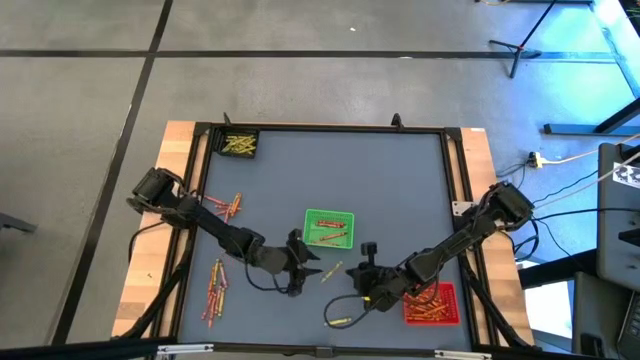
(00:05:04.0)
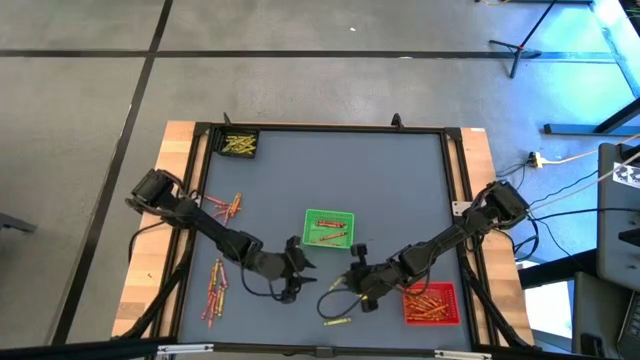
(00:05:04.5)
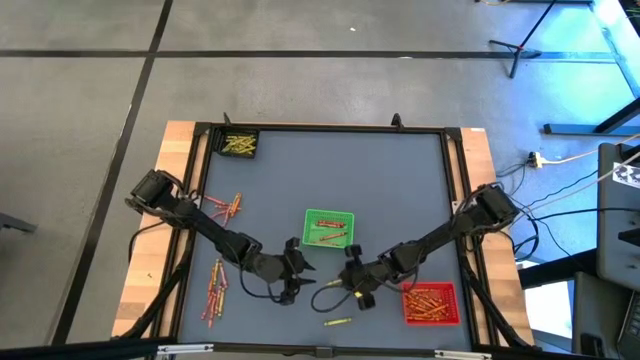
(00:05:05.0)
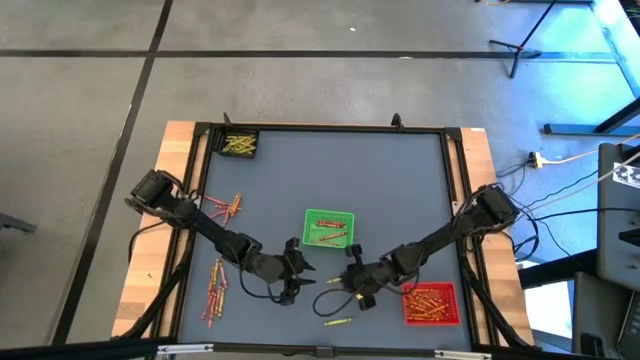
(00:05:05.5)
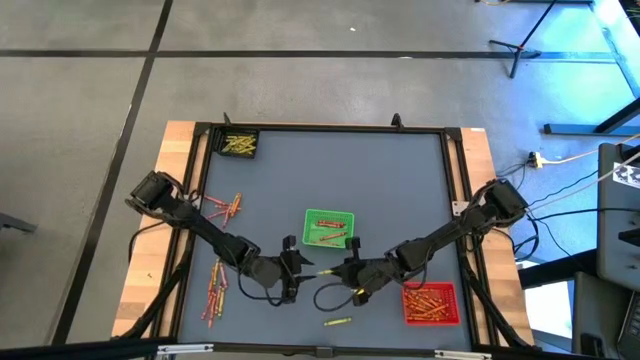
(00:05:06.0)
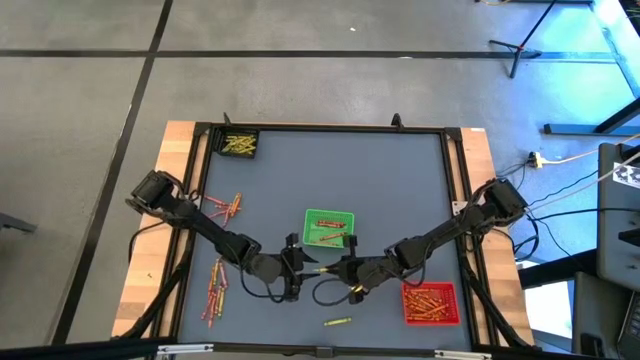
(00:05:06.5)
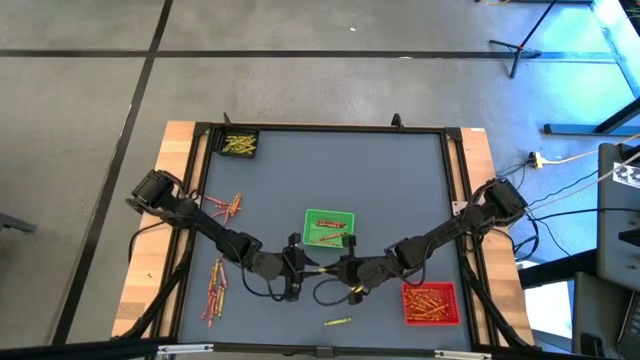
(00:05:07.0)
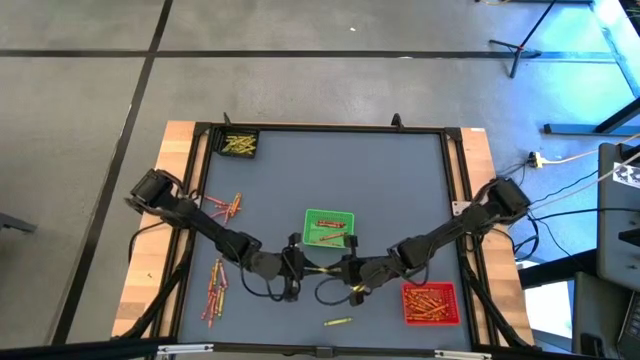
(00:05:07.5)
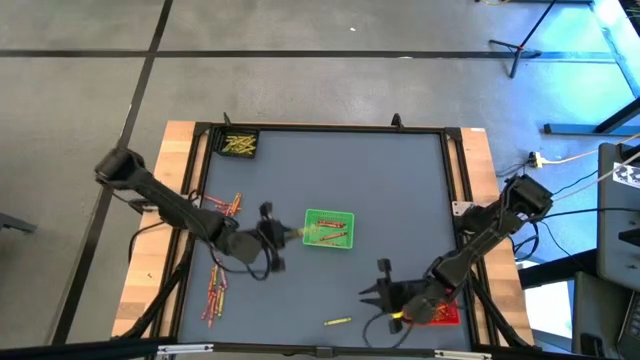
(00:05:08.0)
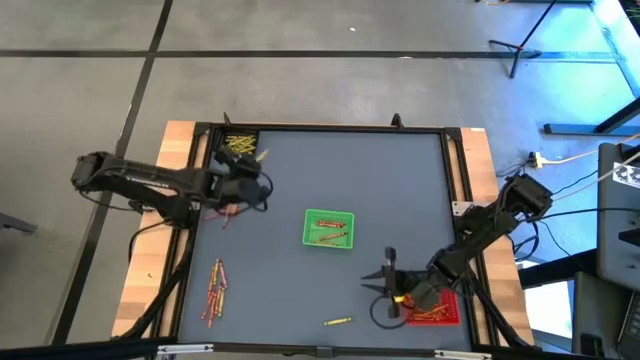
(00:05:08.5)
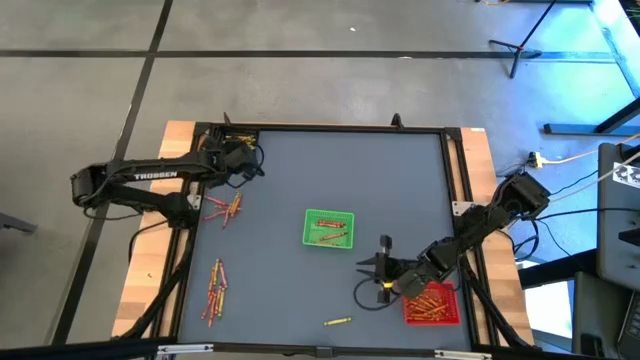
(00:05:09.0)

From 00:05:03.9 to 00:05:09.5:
Task: Sort crayons
Put the light green crayon into the black bin

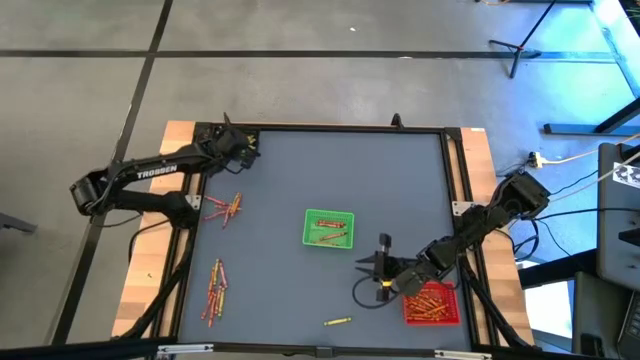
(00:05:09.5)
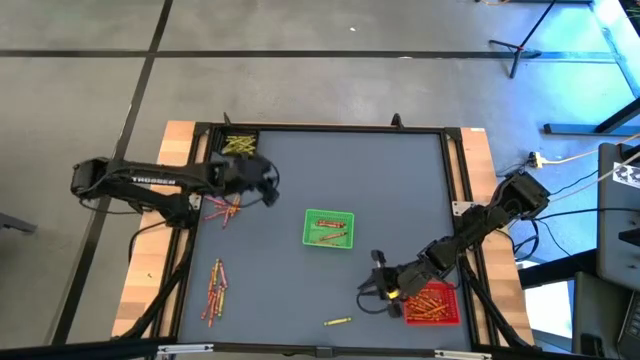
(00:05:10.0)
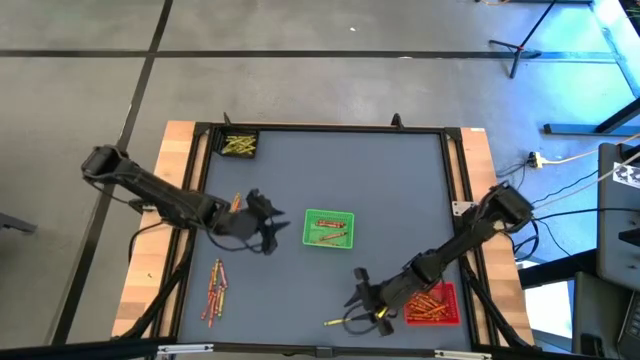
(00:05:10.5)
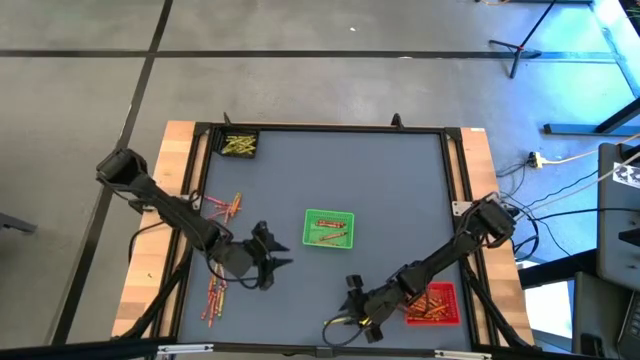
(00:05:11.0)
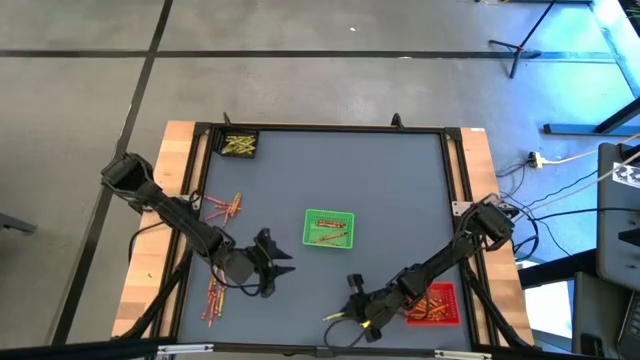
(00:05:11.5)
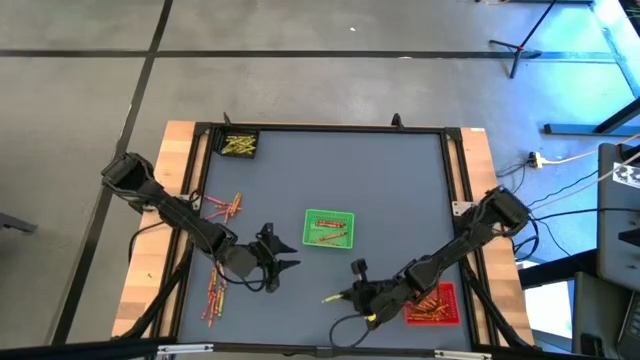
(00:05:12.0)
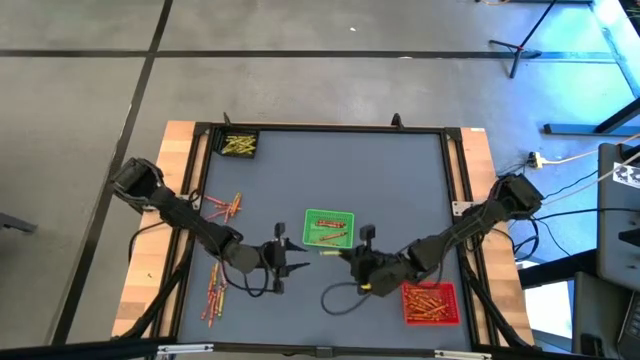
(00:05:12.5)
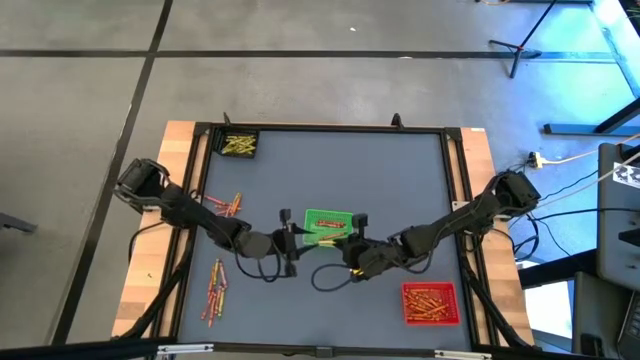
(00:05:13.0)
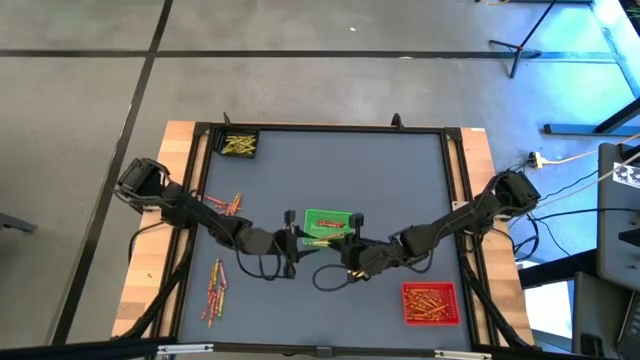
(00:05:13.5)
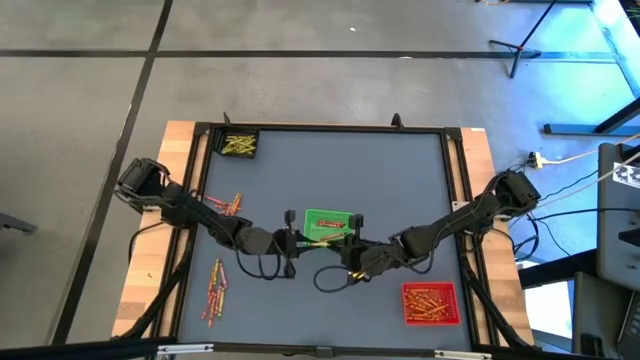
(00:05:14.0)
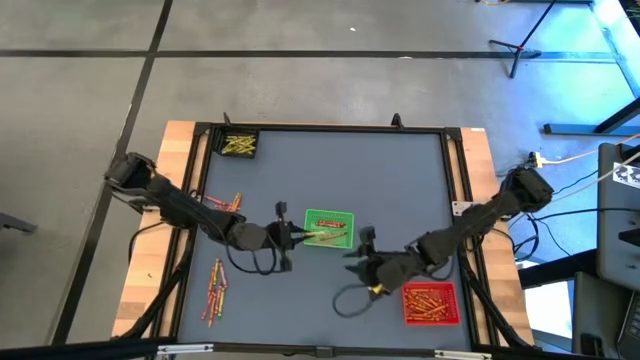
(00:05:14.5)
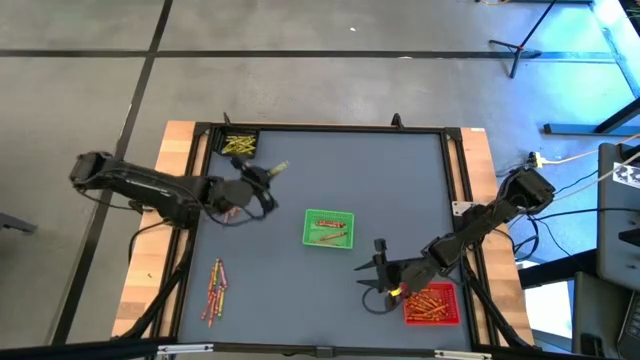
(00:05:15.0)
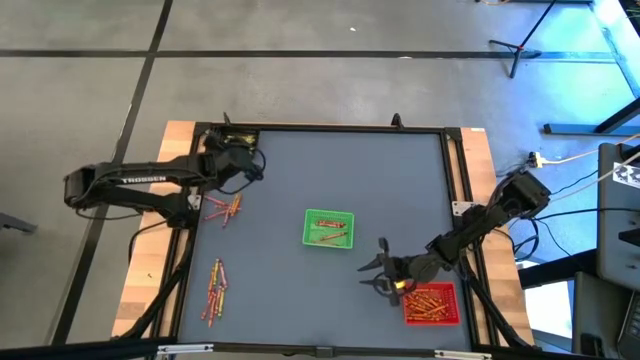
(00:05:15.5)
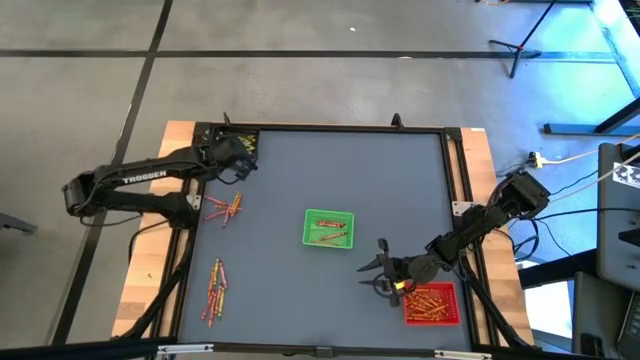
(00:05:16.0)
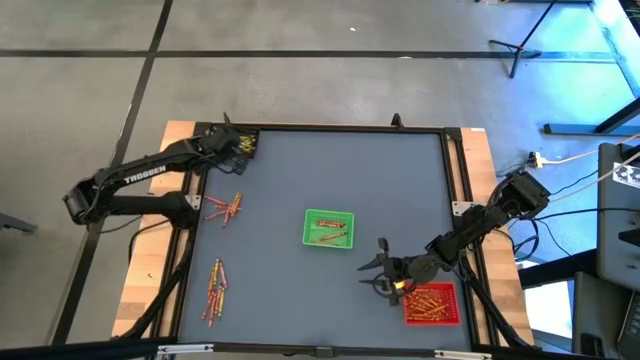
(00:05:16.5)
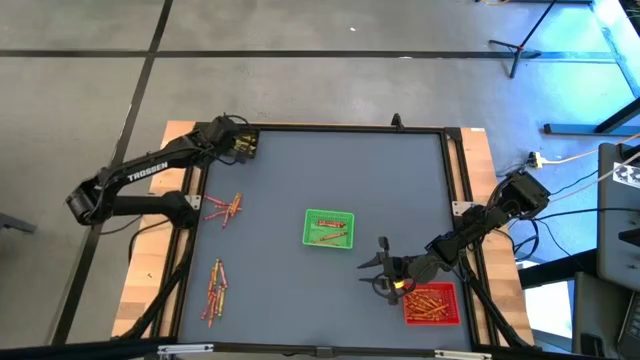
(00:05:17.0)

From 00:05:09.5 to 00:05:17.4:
Put the green crayon into the black bin

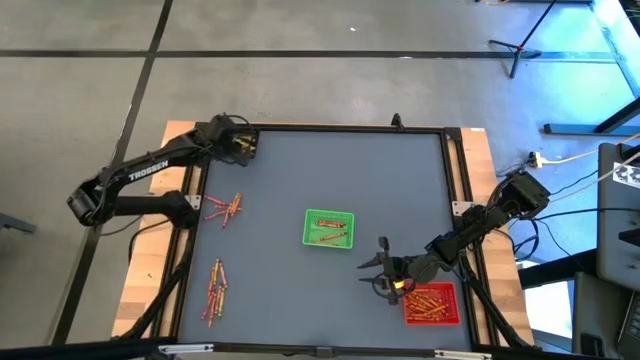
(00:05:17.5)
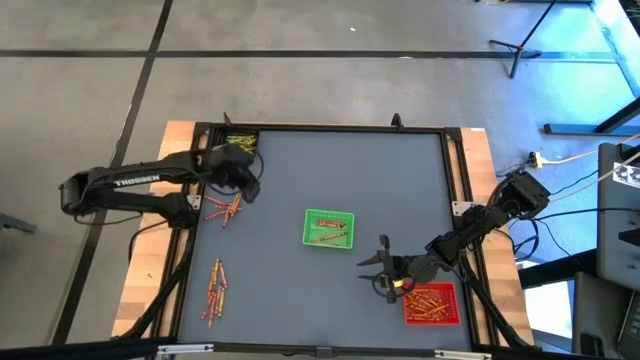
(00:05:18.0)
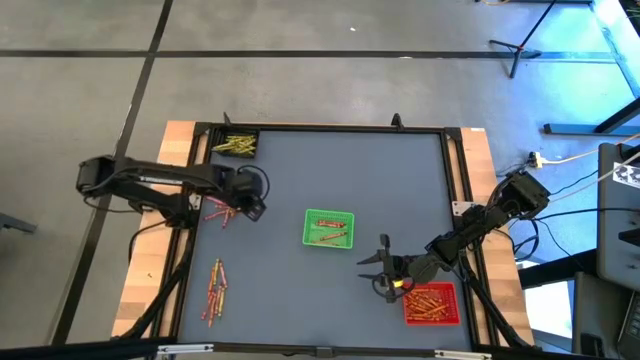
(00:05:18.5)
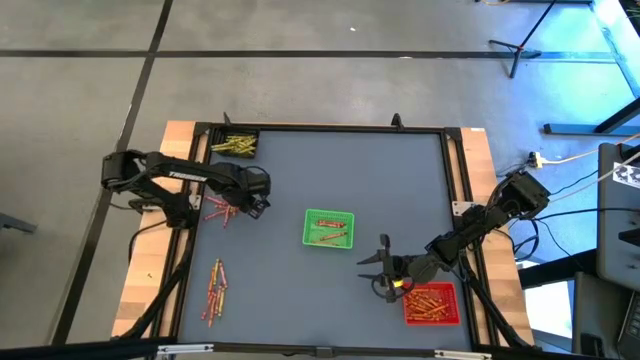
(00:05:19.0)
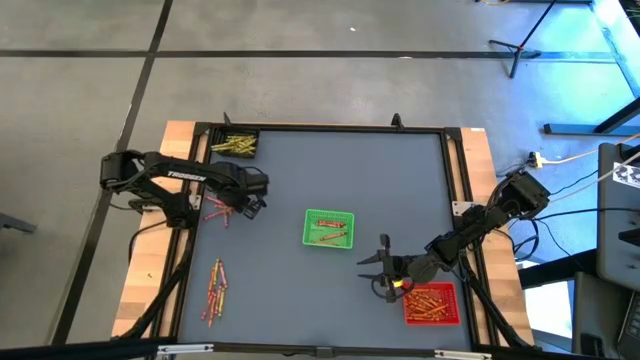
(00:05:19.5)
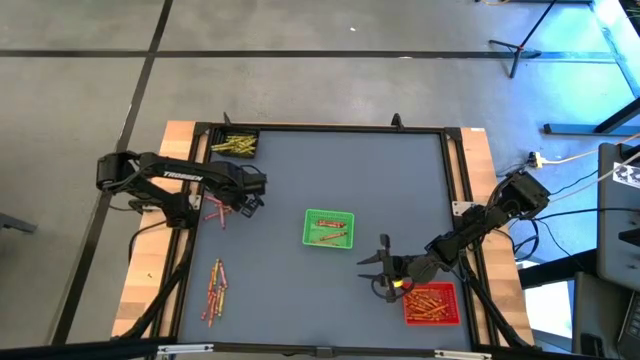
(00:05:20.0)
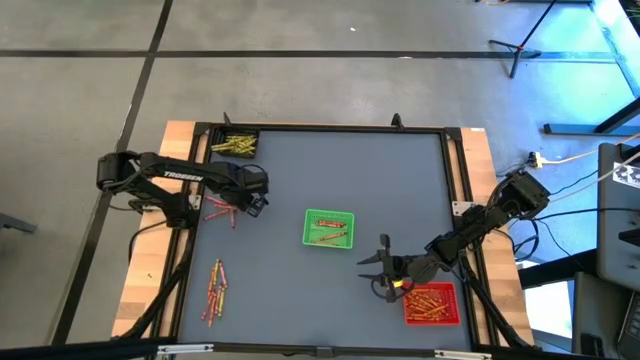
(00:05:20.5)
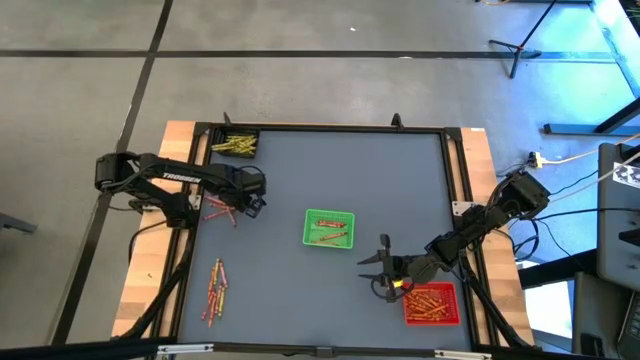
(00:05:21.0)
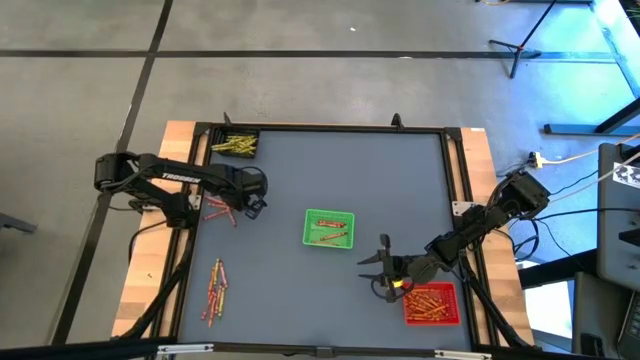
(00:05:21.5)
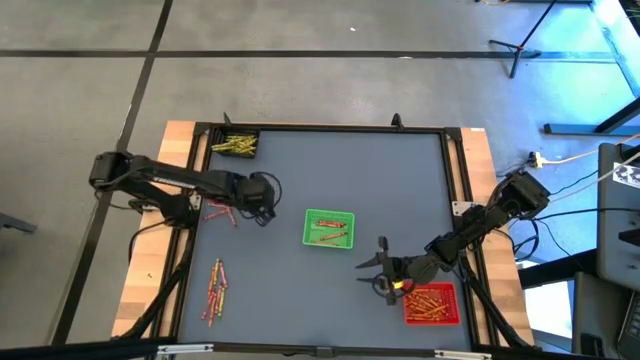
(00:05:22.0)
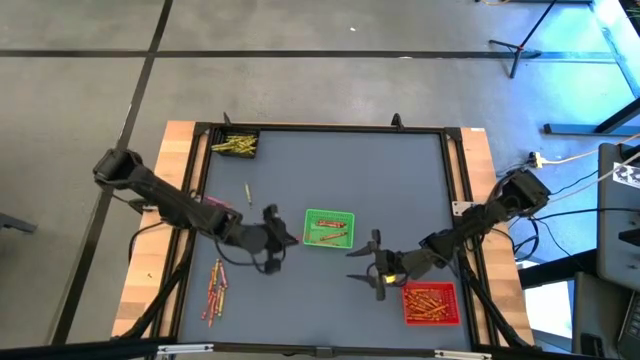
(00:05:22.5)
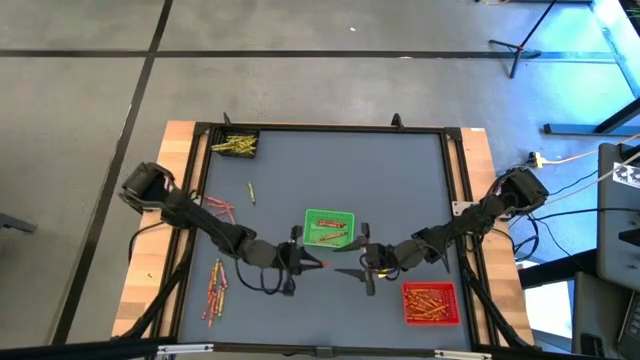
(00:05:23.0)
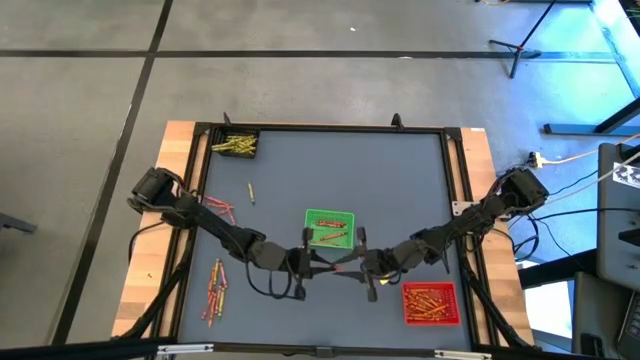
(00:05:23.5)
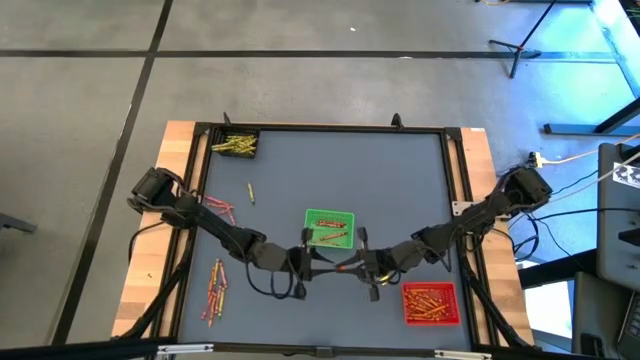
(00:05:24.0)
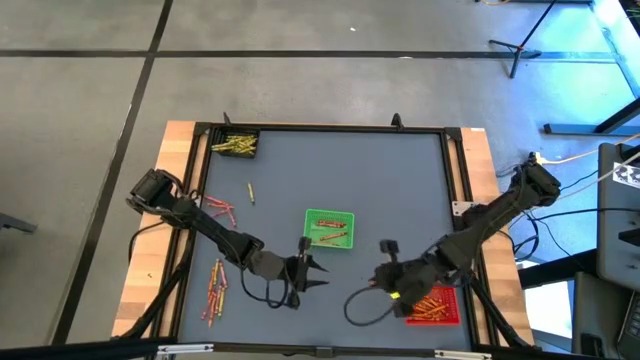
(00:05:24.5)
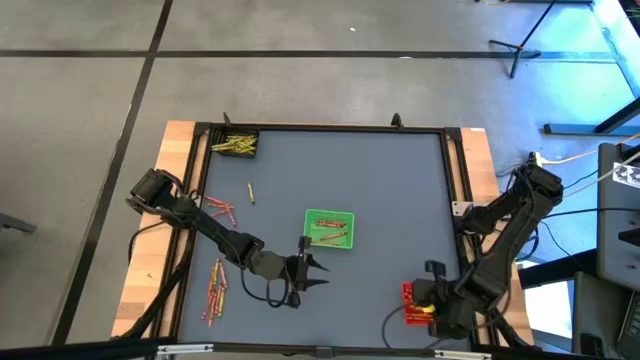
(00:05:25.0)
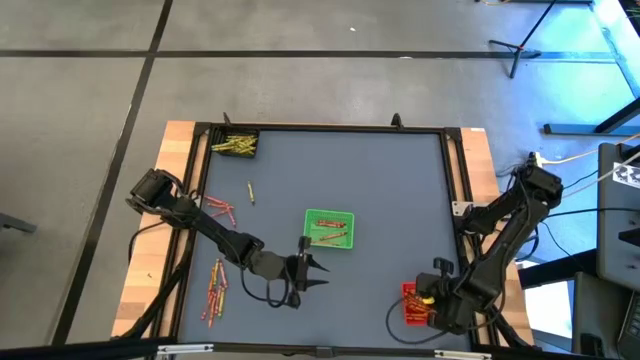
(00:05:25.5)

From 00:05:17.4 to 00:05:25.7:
Put the orange crayon into the red bin
